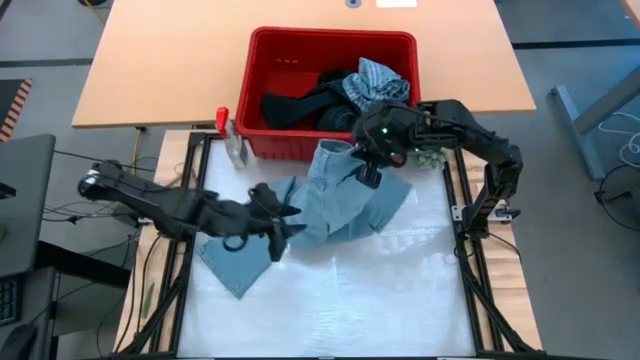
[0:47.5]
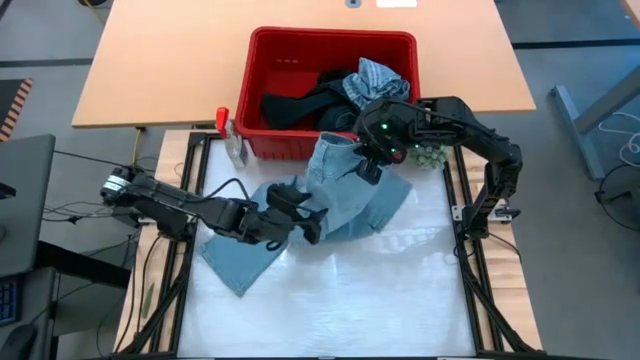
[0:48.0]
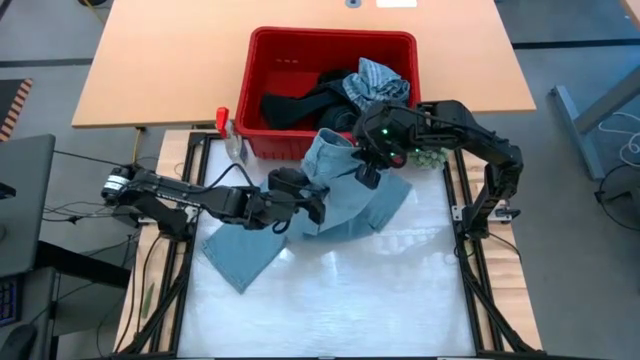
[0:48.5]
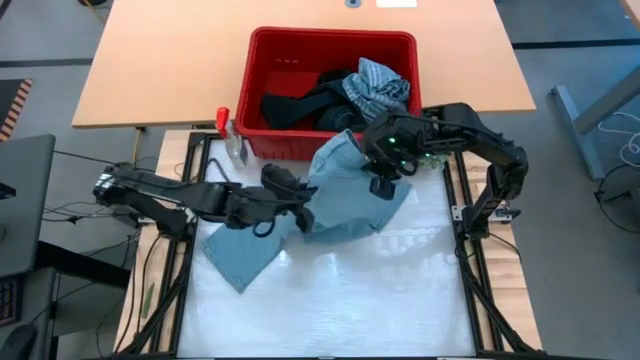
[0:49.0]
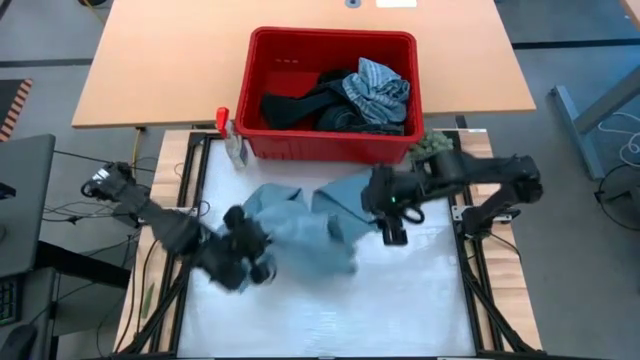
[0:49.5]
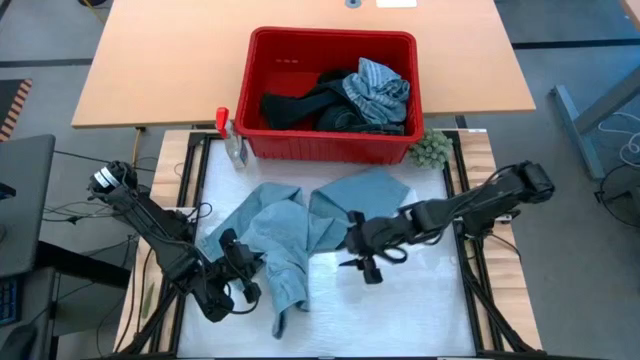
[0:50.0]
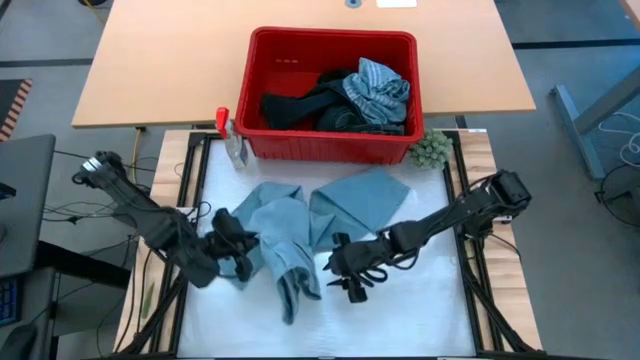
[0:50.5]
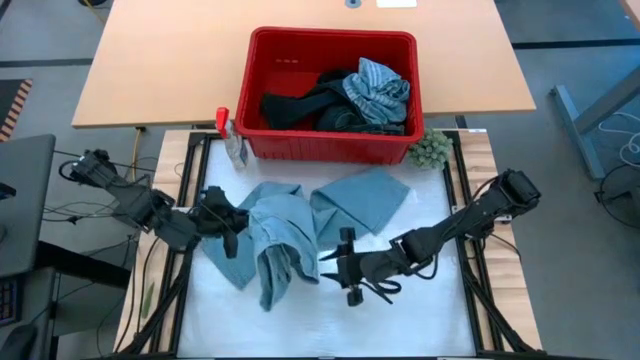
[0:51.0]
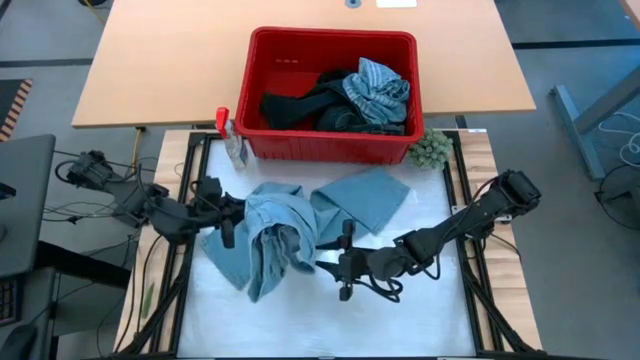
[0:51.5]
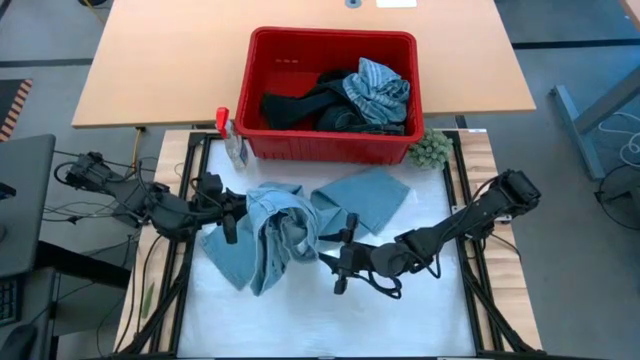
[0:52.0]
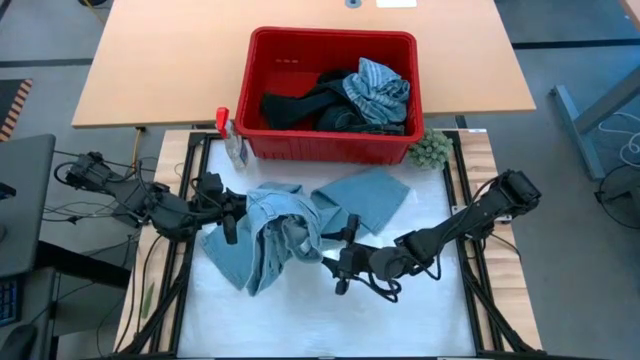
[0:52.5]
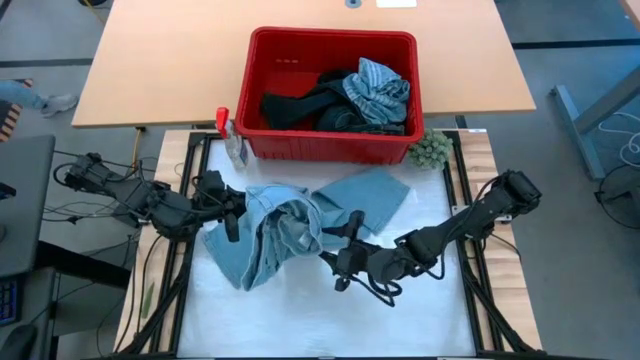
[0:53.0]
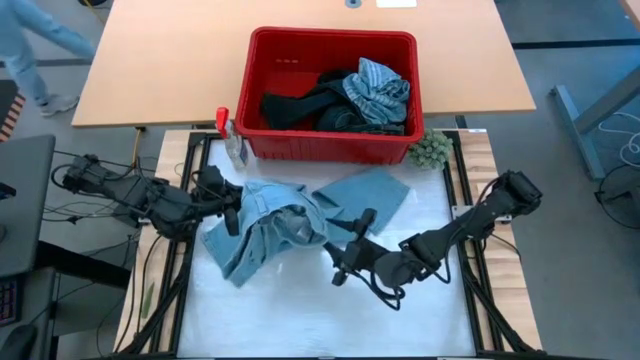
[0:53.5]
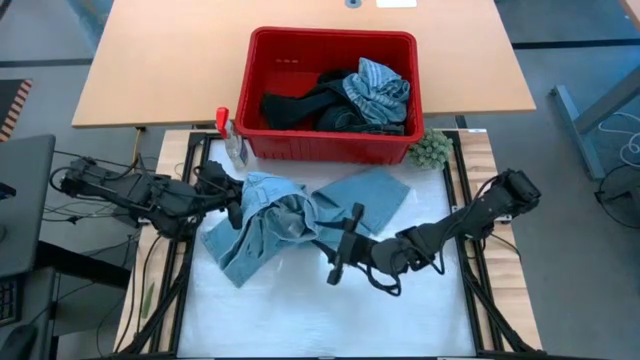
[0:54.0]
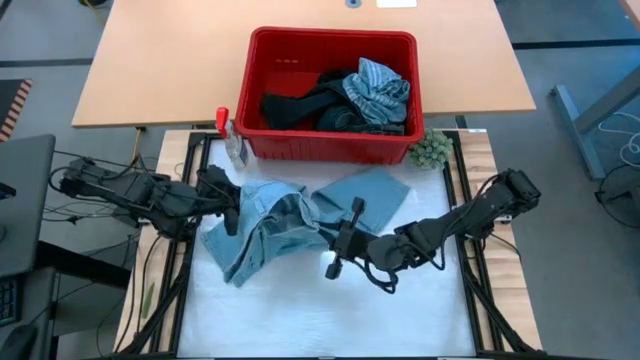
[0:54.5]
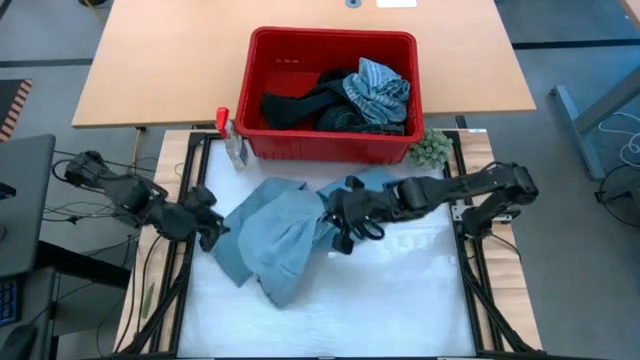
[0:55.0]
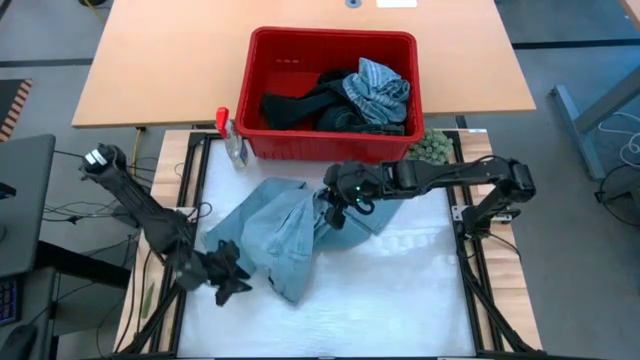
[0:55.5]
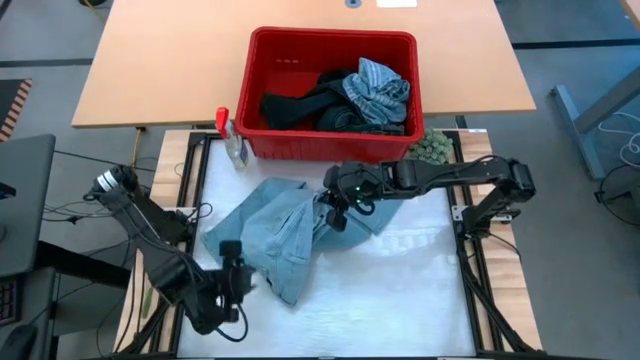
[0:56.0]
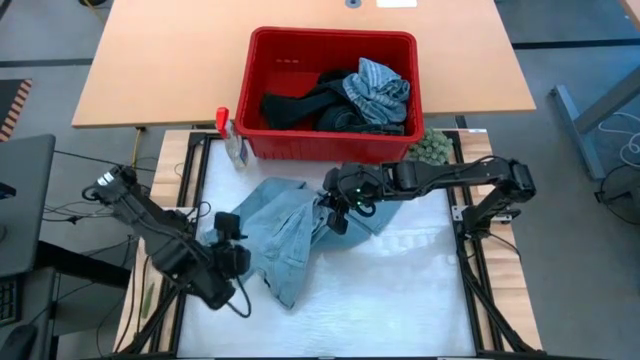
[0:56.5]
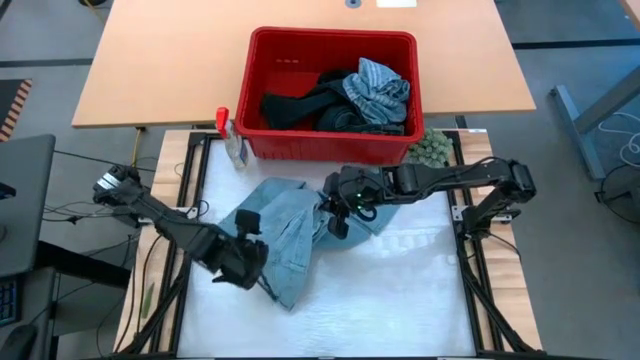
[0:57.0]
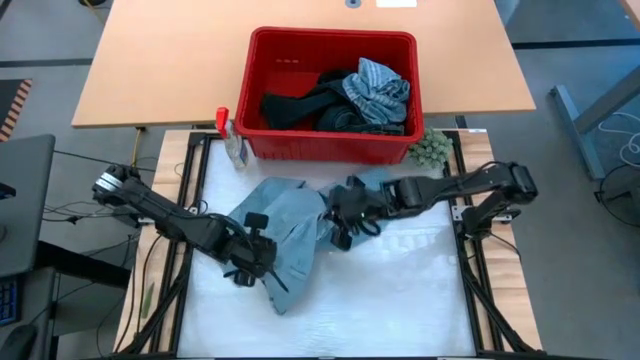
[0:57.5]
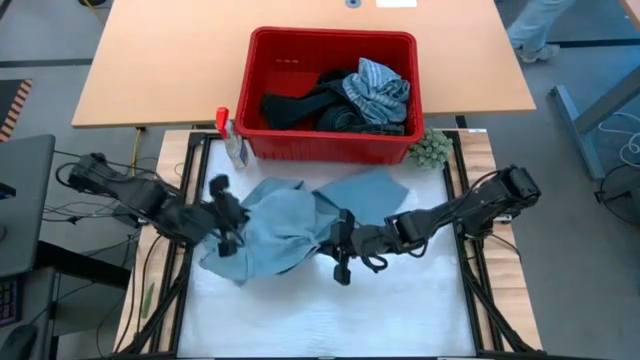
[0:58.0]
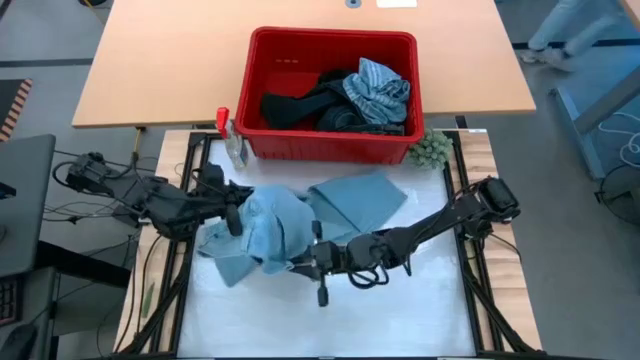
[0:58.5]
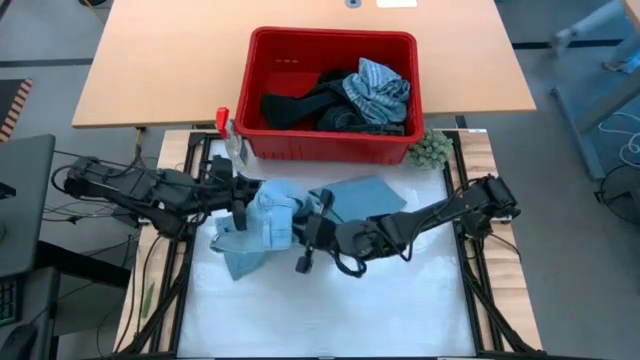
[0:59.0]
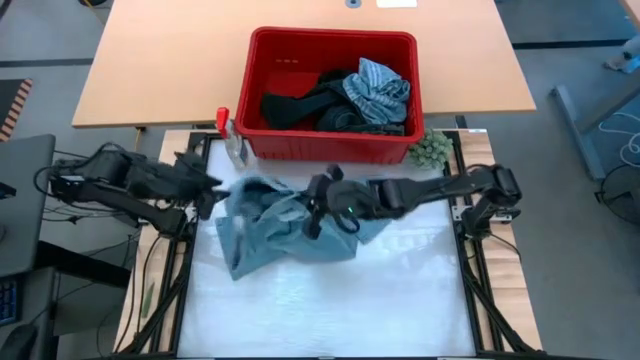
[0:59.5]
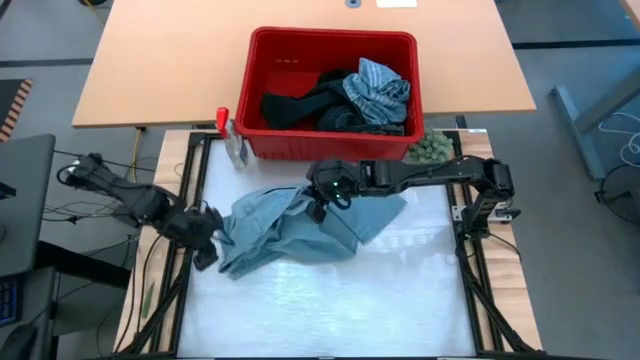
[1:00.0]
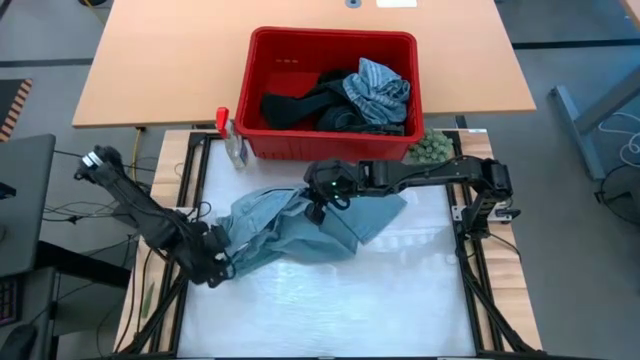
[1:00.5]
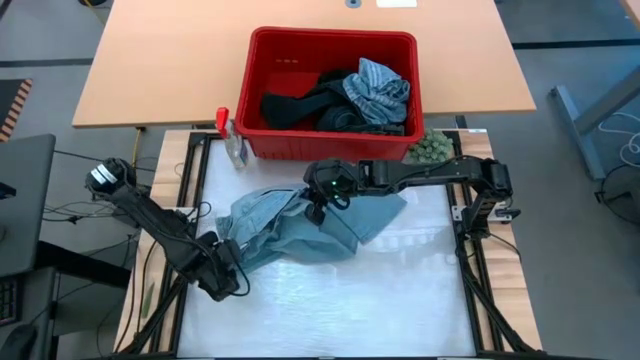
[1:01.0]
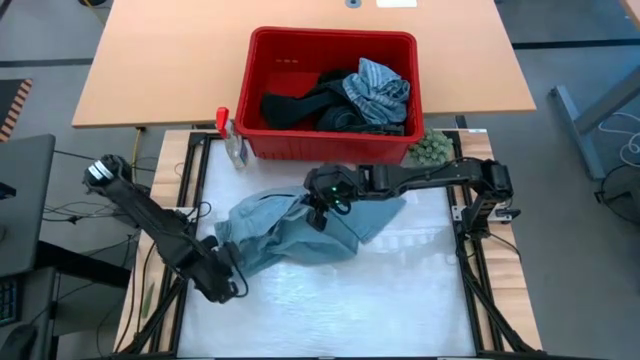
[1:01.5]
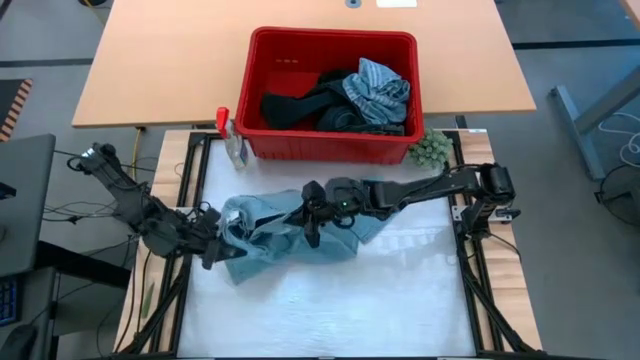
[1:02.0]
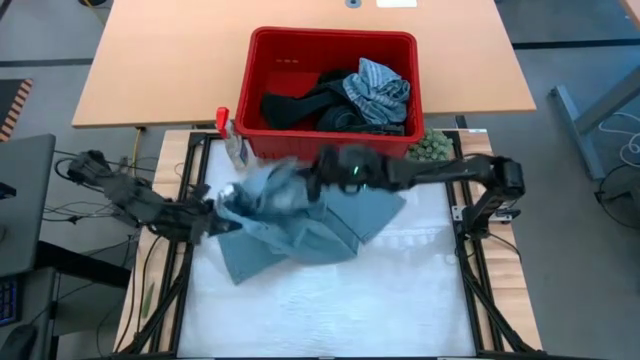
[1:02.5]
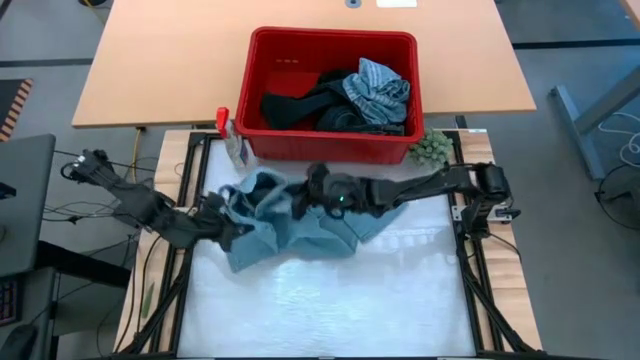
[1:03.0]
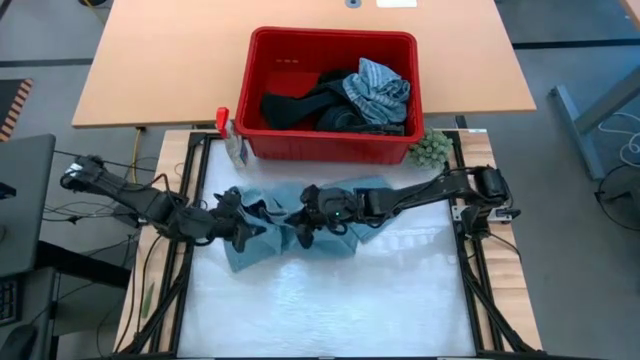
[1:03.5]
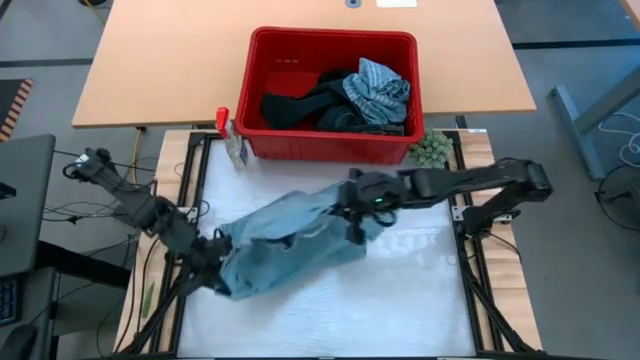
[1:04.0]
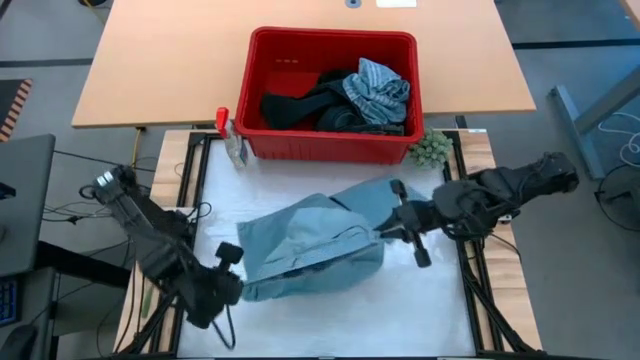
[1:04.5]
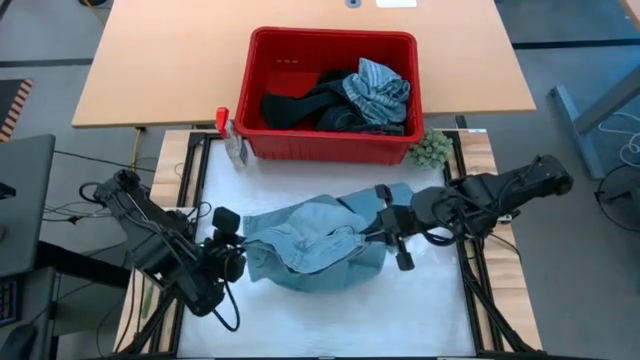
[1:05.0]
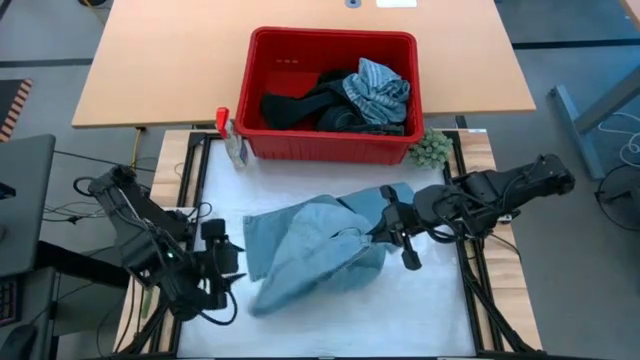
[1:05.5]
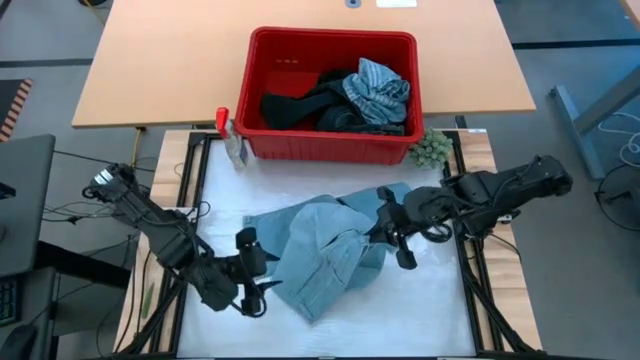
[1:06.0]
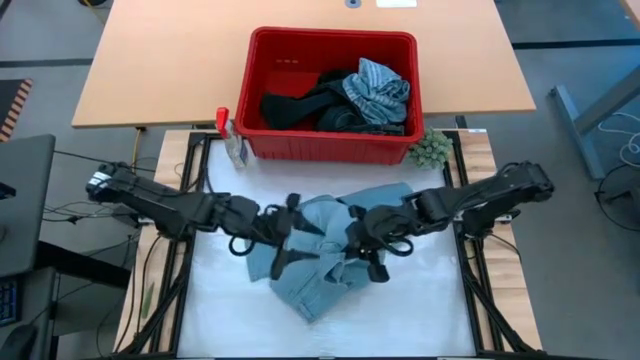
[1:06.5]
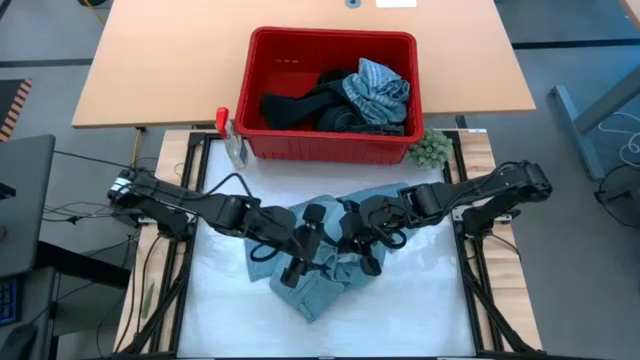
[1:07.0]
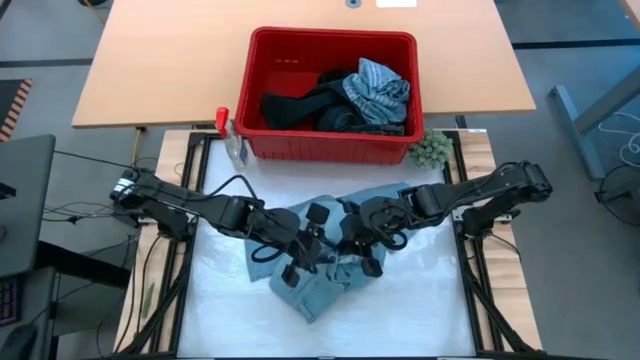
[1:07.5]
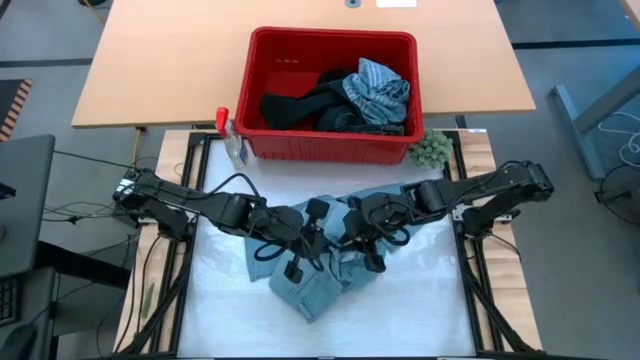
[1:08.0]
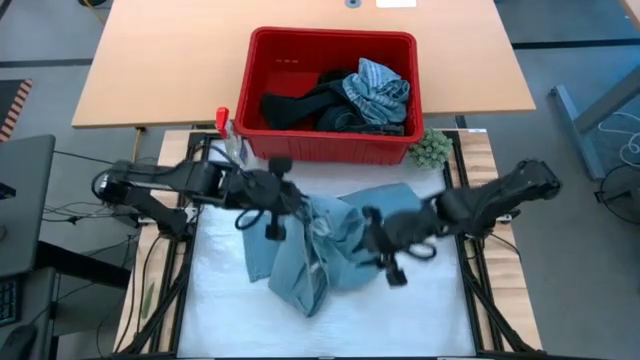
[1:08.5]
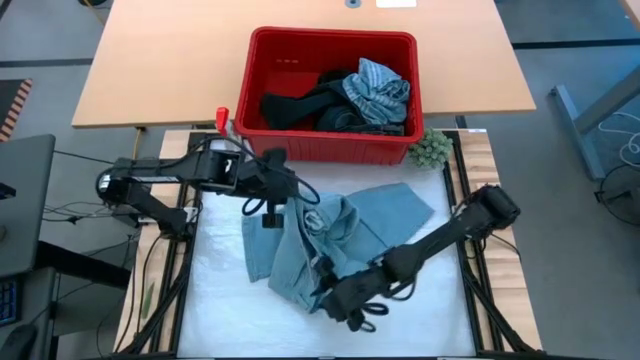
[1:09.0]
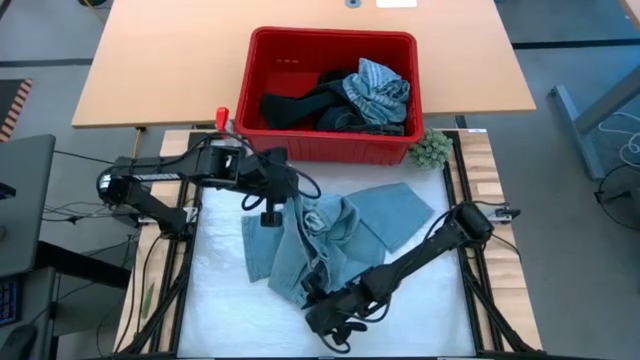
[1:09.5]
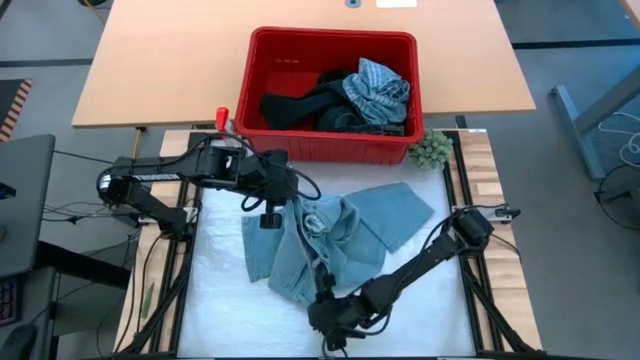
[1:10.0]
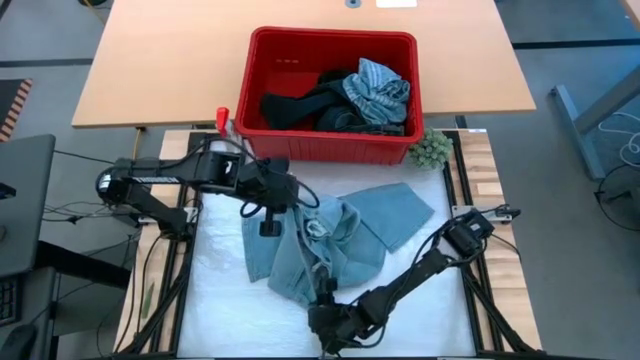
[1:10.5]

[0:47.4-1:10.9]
Task: Fold laundry
Fold the blue pants from the red laundry bin
